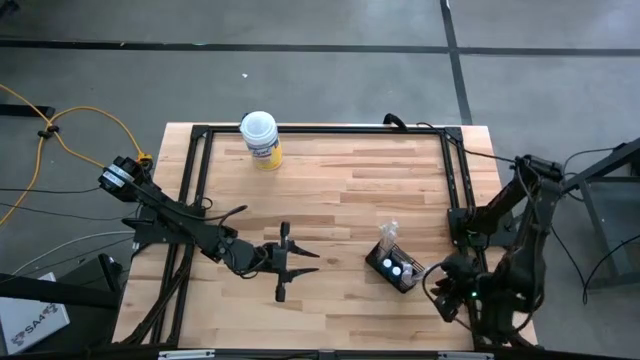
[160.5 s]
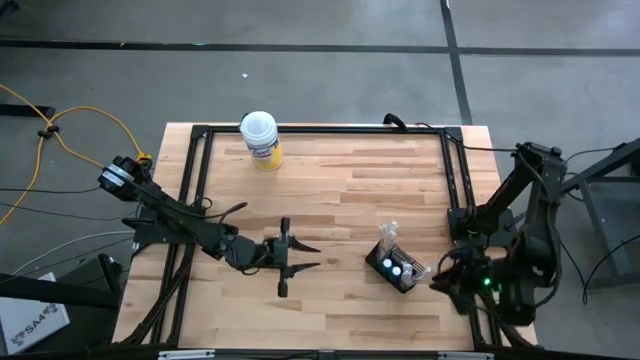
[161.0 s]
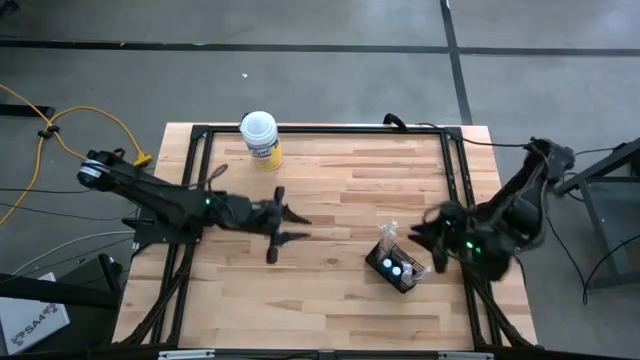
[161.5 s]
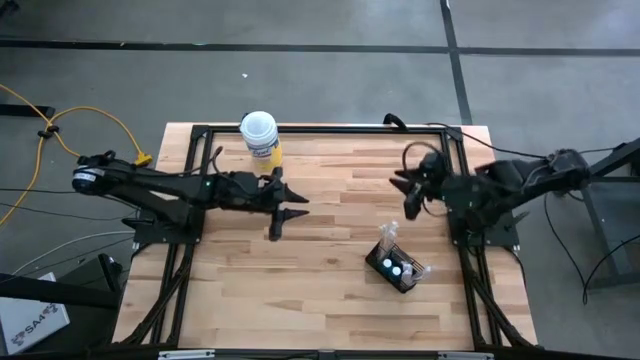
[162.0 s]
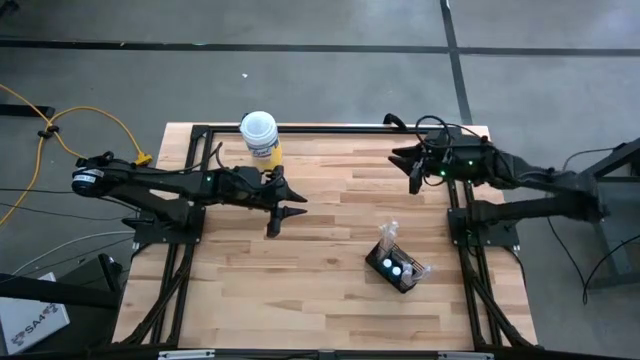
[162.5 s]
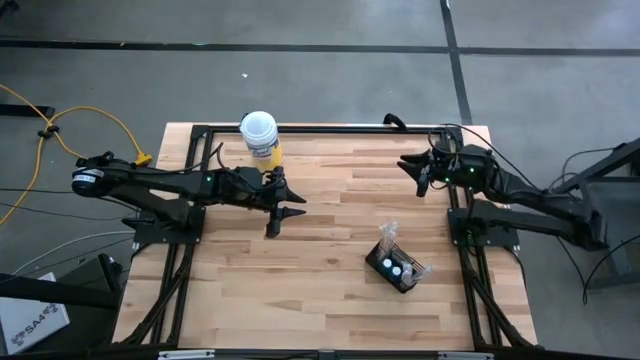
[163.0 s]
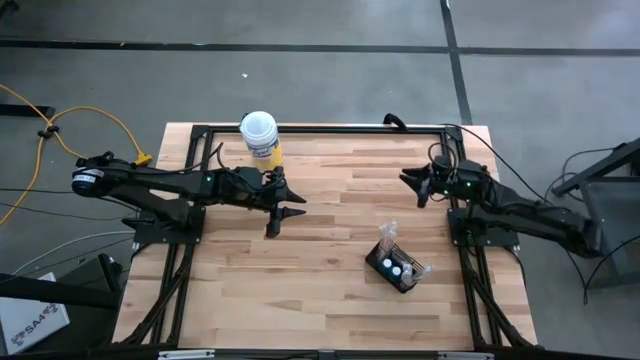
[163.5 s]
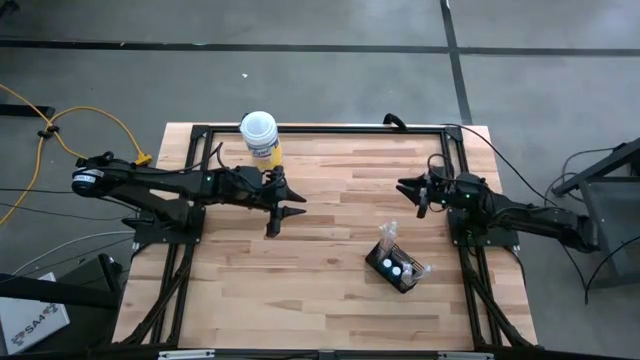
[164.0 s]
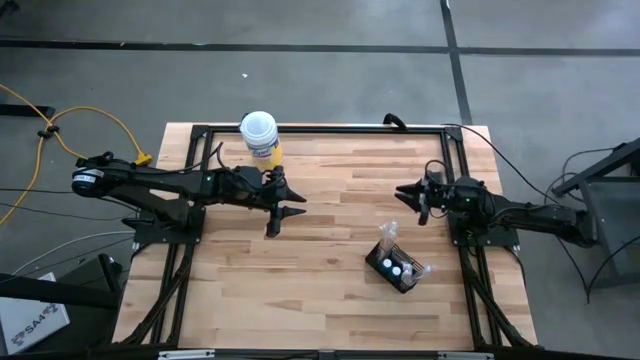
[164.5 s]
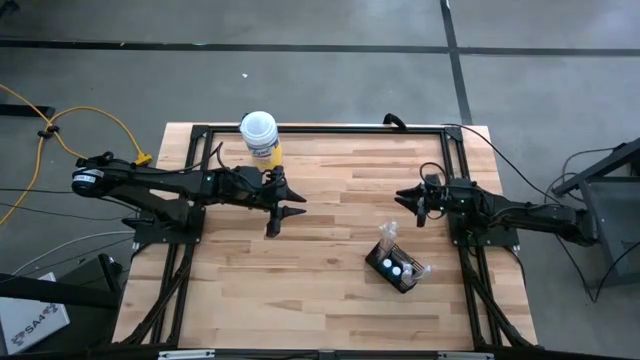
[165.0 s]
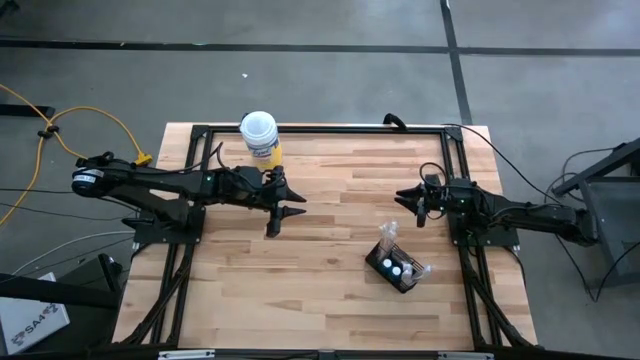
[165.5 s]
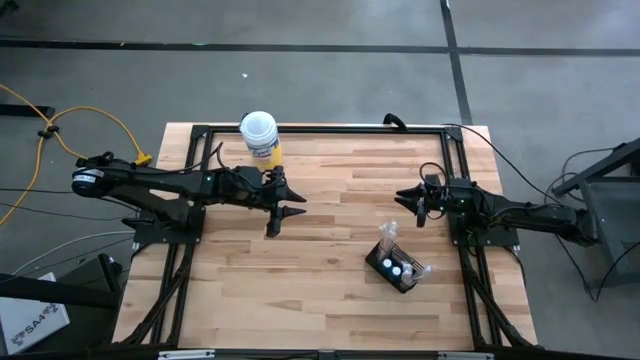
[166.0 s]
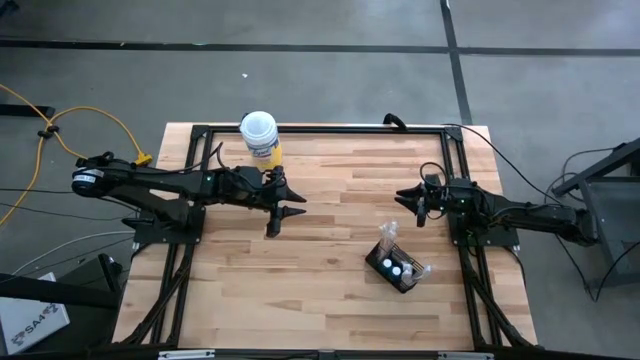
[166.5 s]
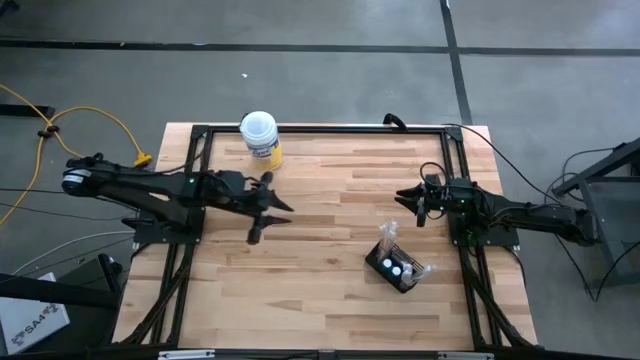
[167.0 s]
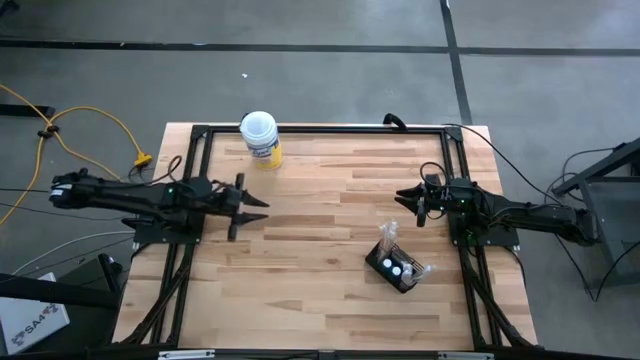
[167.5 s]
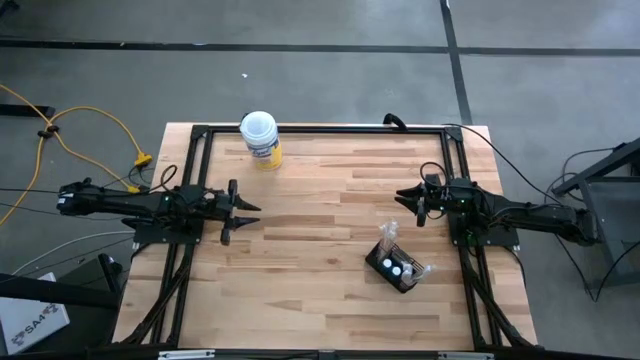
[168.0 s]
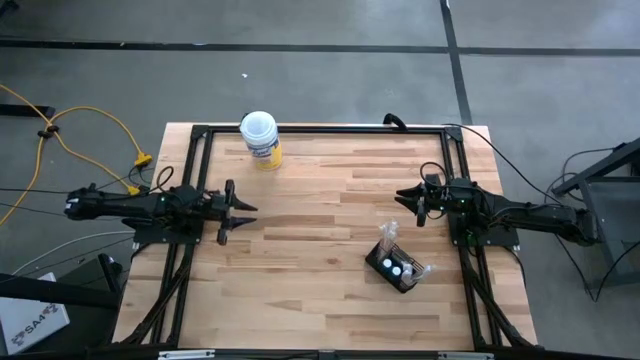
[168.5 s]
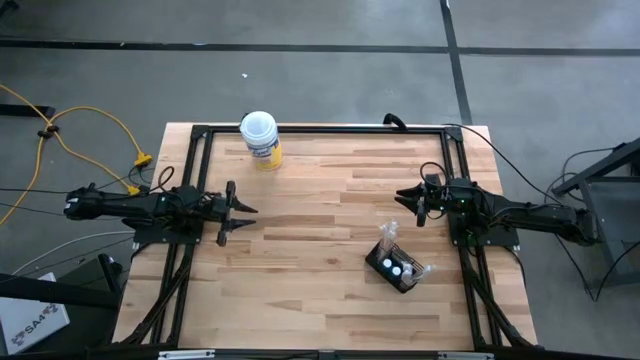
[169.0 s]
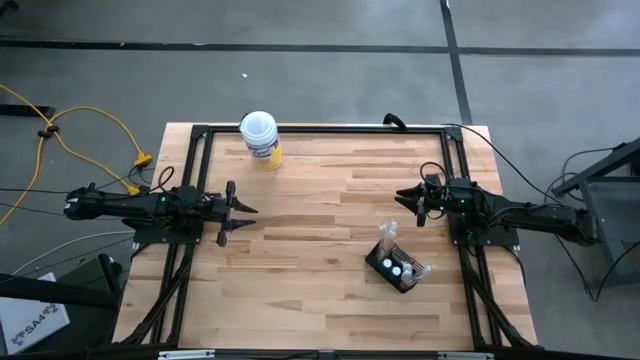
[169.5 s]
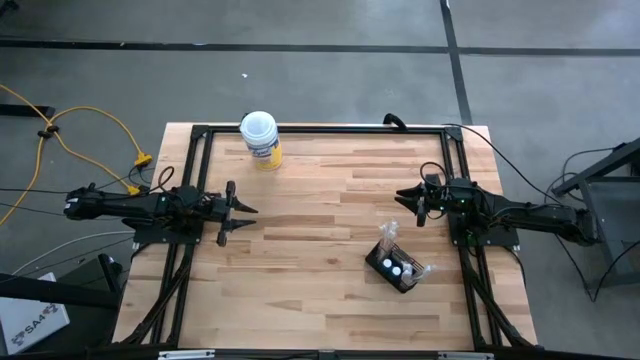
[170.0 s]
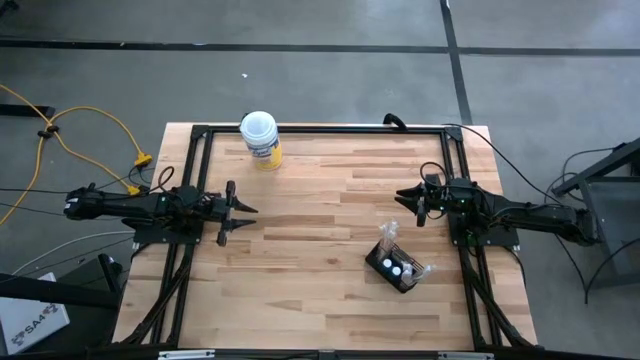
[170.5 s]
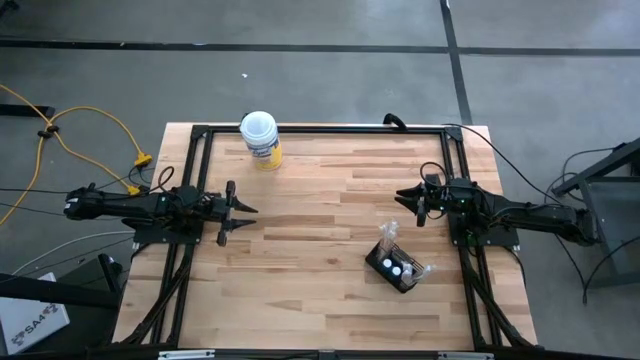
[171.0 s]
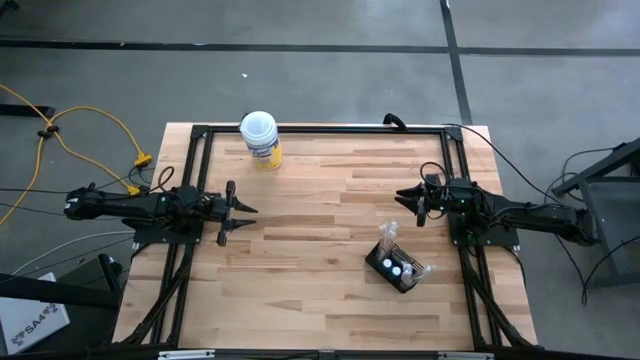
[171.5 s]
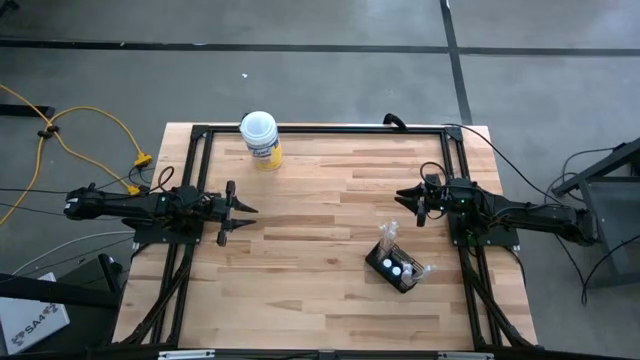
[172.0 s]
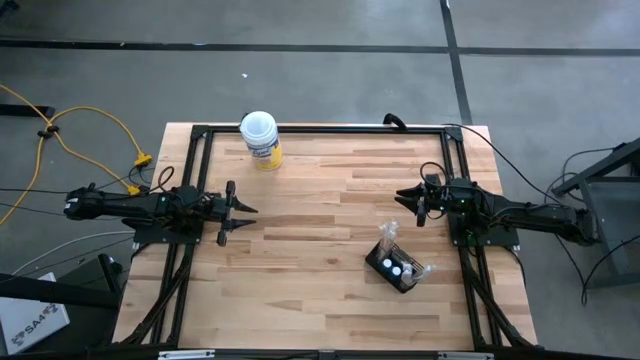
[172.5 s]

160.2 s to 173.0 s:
Task: Pick & Place toothbrushing station
Return to Home Position
